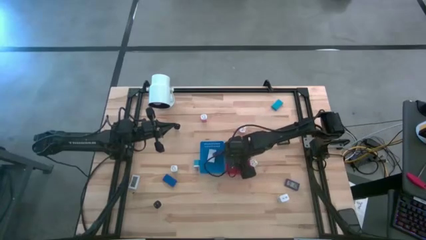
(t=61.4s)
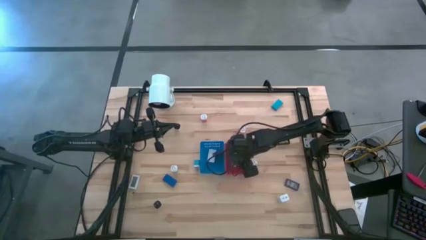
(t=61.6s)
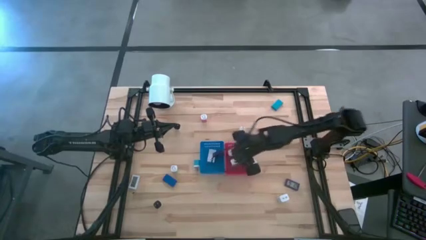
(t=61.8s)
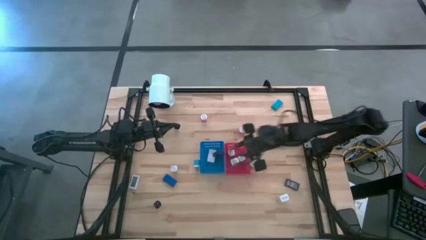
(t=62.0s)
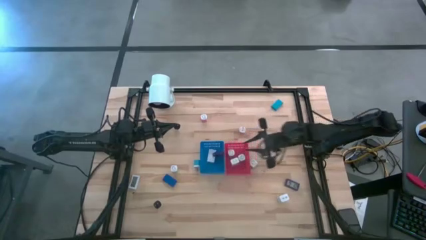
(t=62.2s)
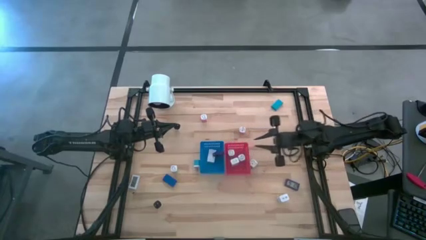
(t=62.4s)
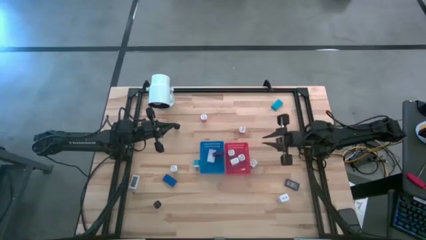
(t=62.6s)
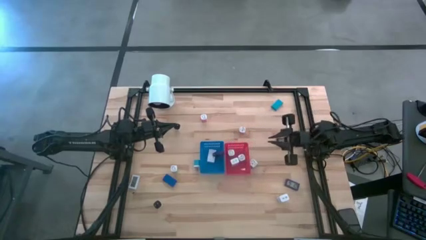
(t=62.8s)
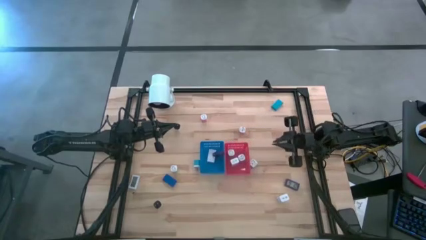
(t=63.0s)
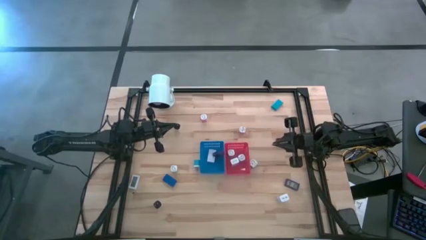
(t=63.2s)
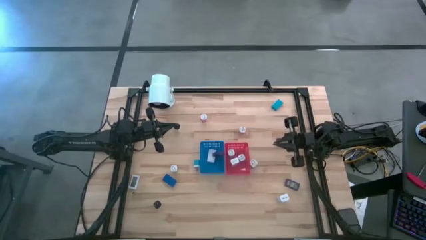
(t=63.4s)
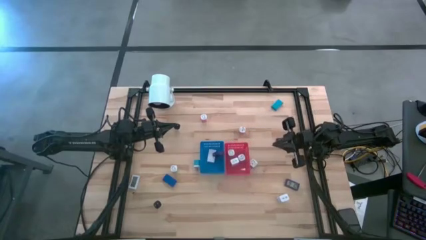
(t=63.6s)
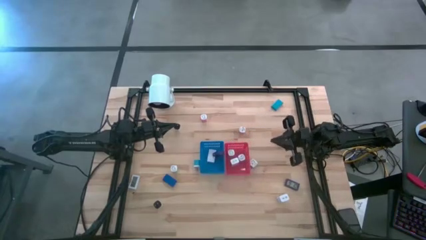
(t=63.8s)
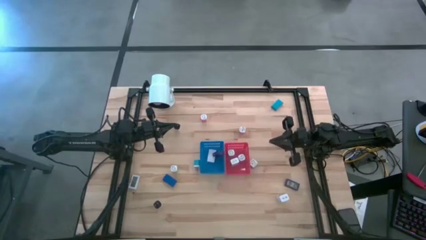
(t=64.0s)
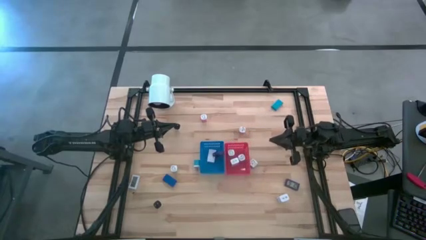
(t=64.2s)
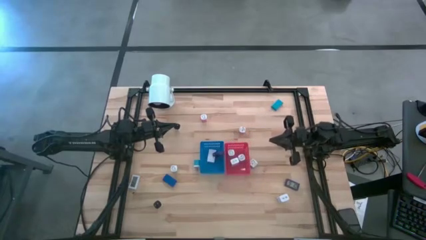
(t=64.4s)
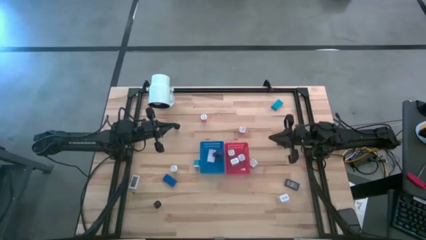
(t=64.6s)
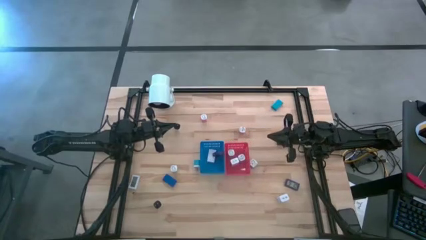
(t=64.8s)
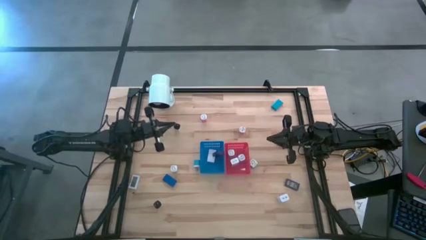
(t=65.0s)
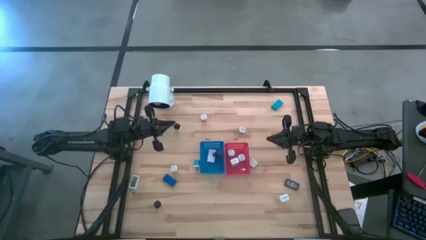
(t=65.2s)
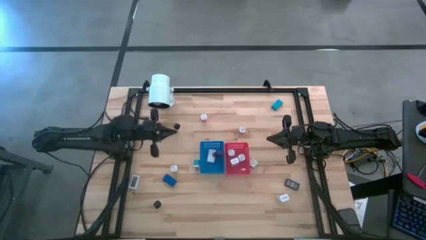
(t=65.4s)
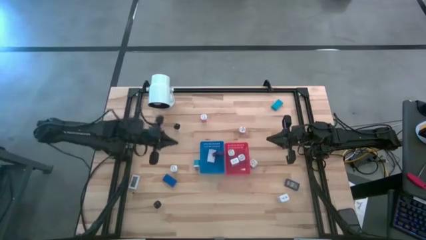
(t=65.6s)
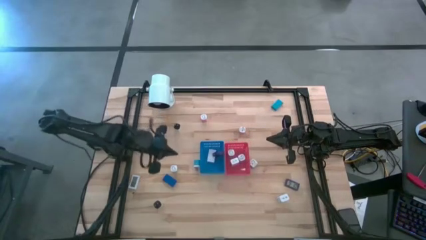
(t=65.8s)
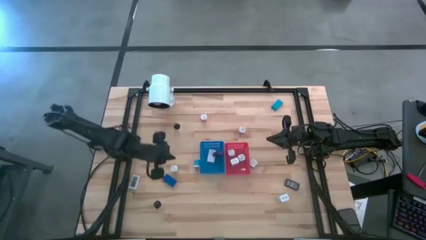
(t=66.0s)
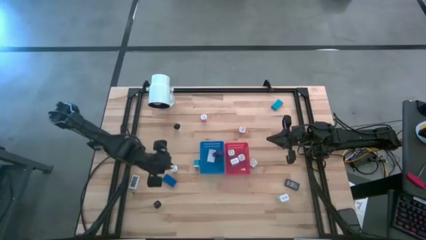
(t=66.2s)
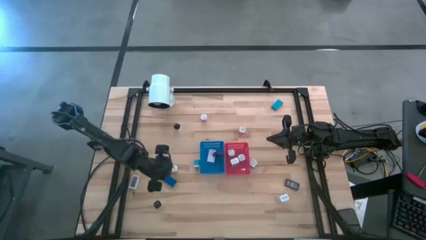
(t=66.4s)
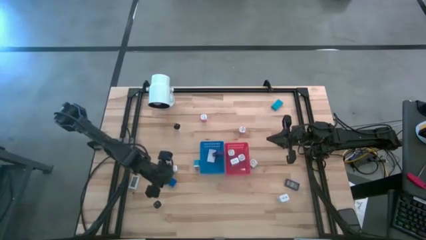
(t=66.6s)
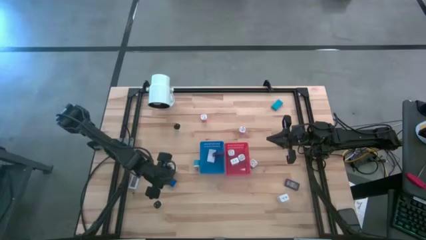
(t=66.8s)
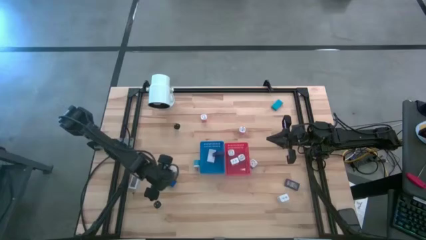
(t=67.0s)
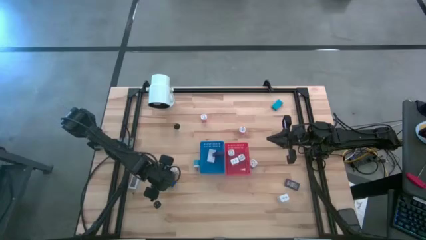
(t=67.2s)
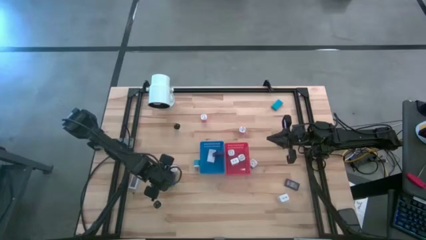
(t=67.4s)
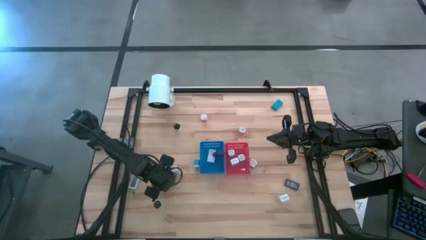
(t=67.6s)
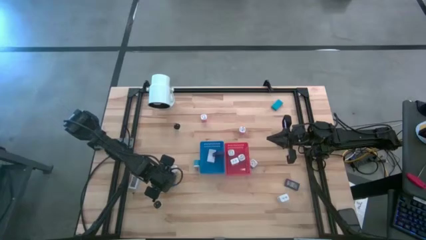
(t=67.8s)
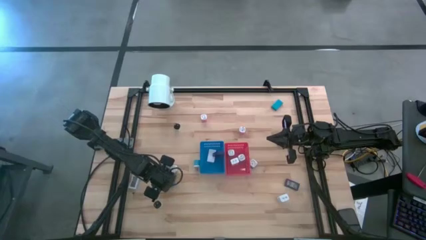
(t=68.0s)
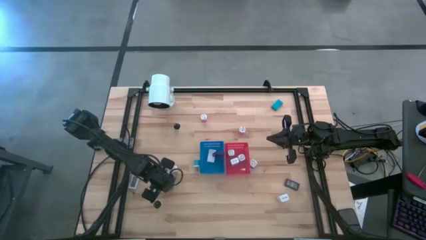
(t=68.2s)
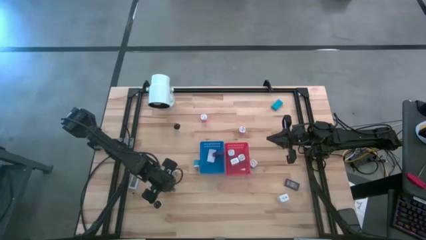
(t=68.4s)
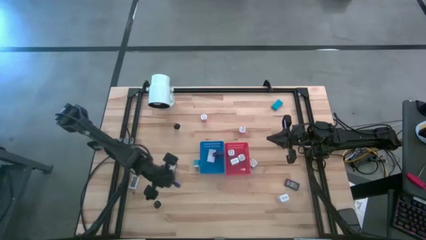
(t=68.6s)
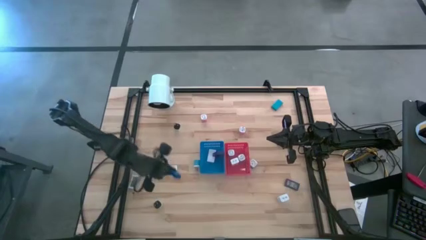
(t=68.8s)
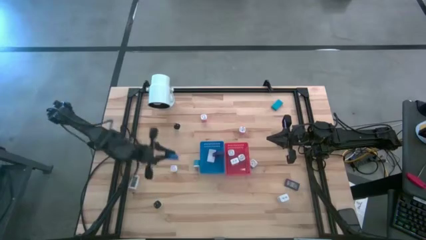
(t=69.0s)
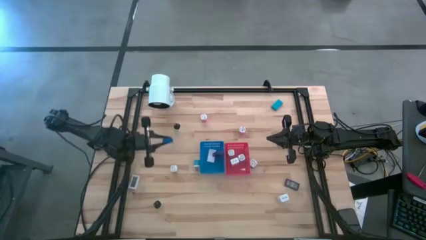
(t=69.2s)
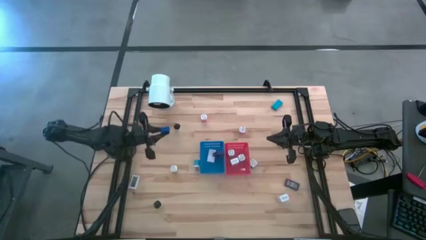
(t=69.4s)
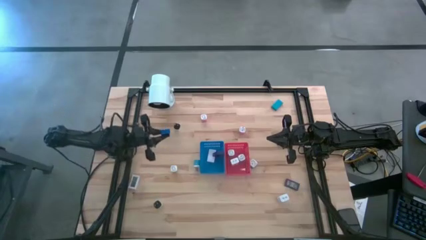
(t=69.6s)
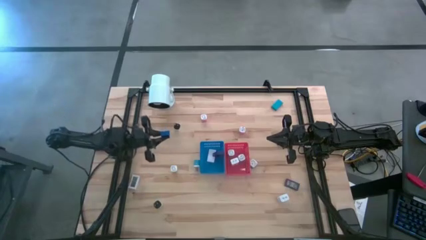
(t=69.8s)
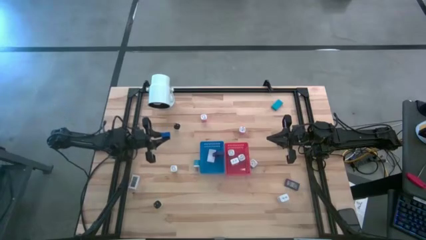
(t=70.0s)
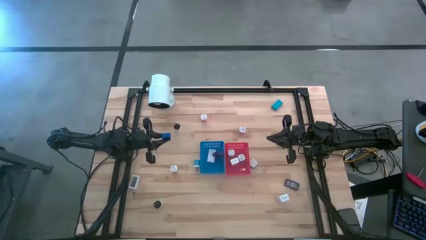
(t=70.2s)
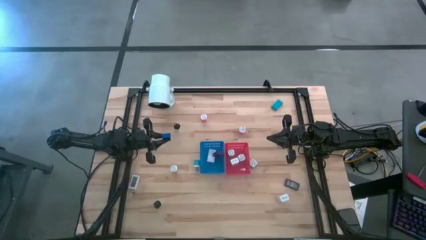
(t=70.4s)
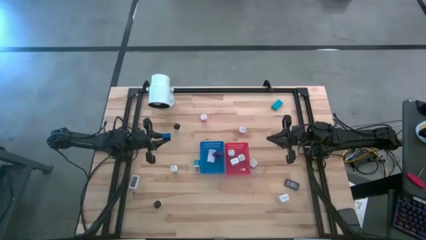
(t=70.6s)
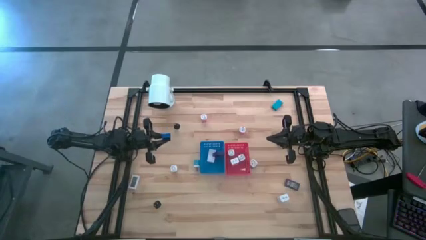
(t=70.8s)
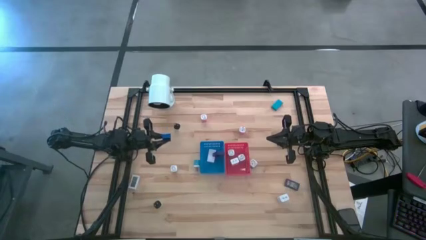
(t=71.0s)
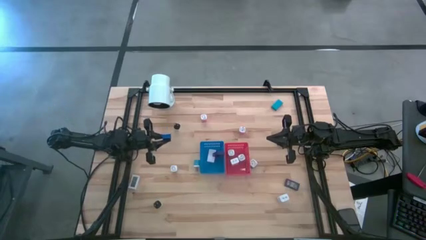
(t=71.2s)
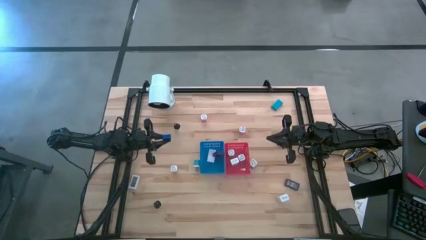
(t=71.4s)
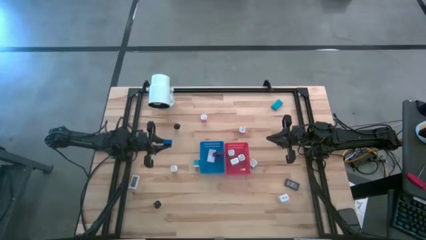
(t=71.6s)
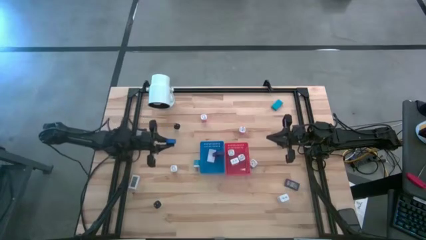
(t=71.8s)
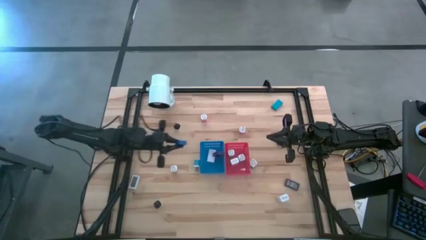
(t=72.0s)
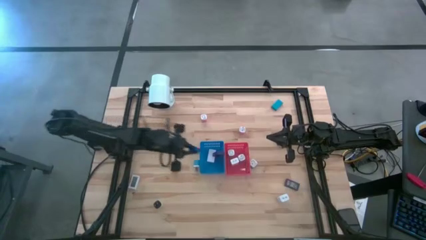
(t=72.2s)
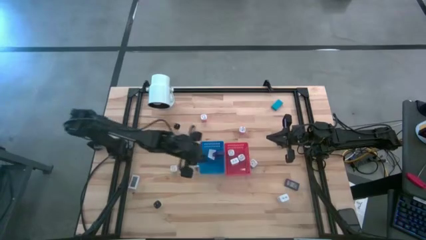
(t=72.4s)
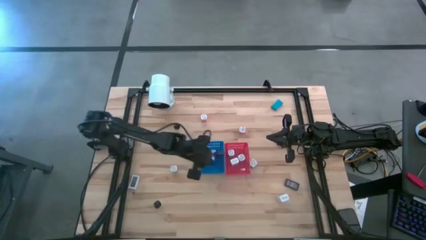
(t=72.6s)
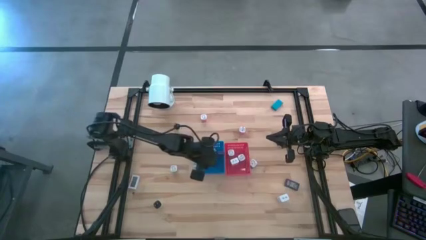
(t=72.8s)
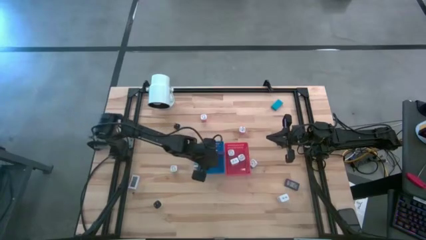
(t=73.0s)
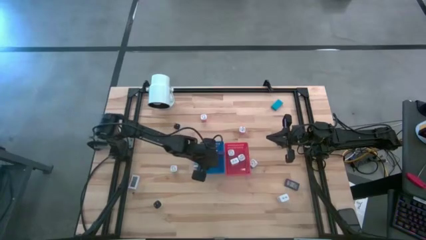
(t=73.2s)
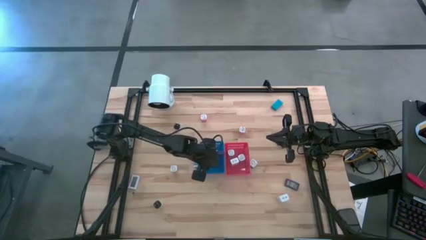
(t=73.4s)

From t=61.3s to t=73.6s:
Task: Sort adapters and digital timers
Put the blue timer into the blue bin

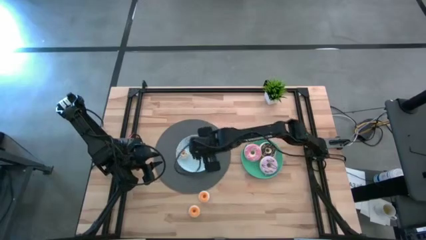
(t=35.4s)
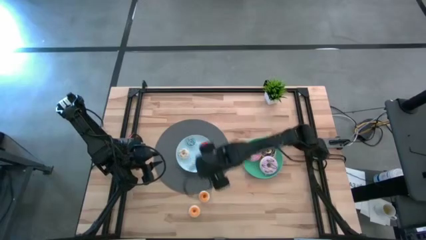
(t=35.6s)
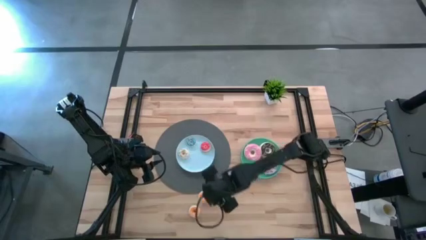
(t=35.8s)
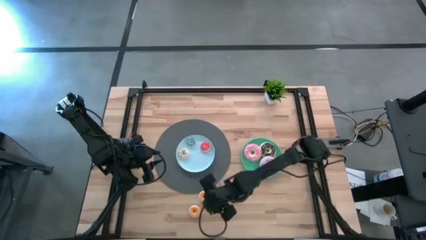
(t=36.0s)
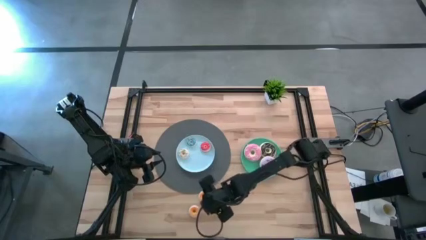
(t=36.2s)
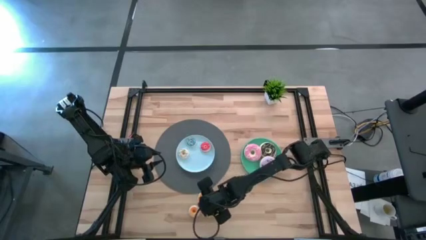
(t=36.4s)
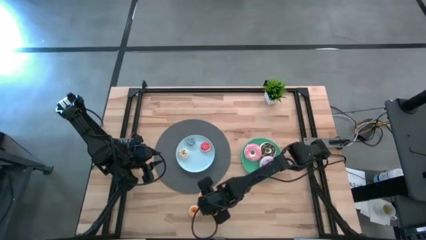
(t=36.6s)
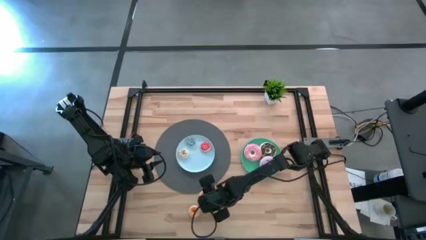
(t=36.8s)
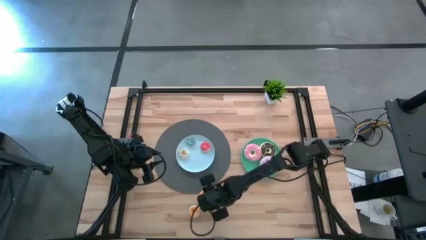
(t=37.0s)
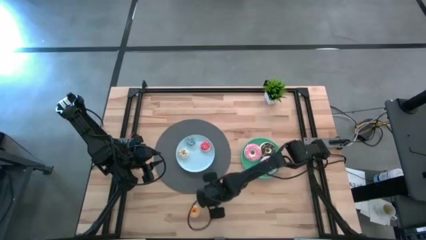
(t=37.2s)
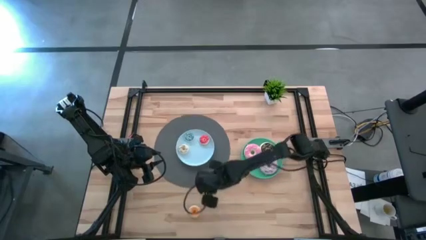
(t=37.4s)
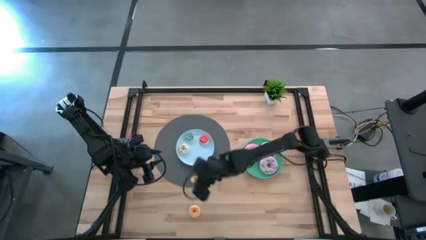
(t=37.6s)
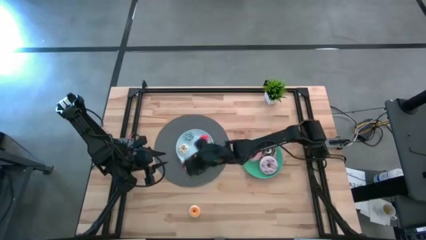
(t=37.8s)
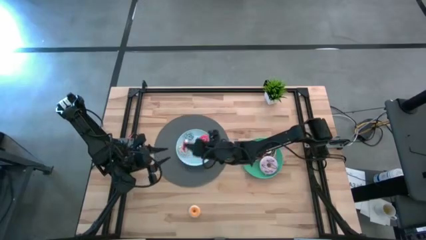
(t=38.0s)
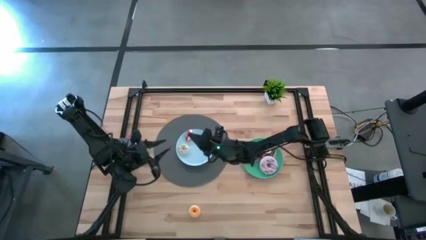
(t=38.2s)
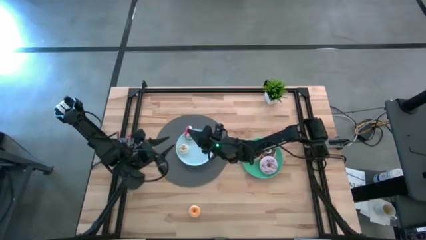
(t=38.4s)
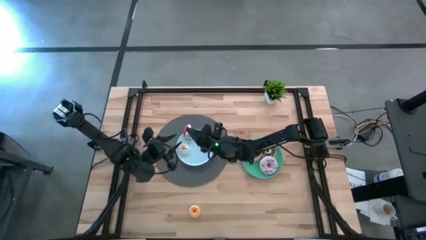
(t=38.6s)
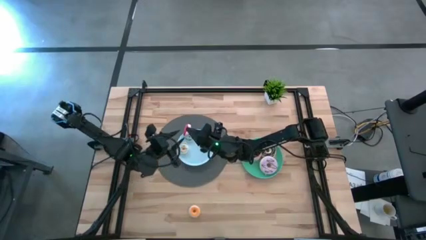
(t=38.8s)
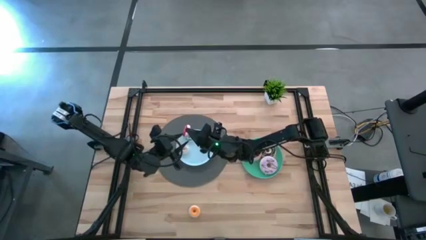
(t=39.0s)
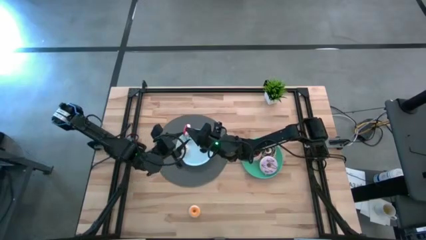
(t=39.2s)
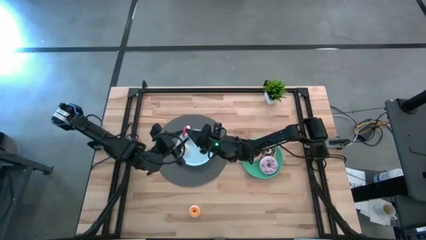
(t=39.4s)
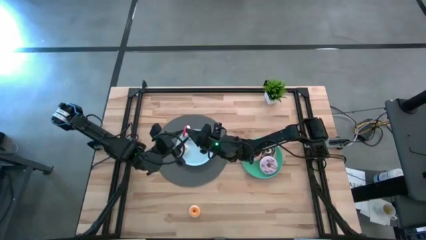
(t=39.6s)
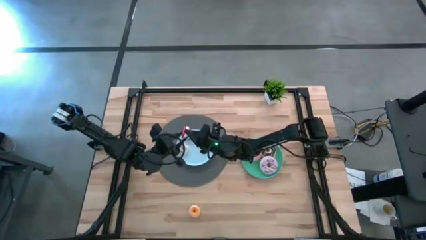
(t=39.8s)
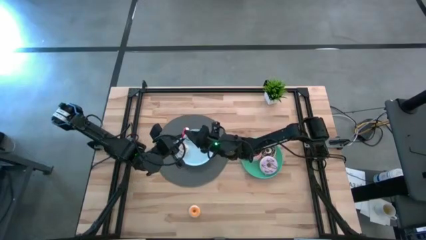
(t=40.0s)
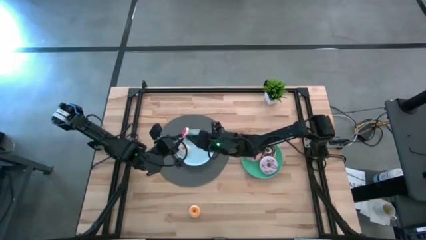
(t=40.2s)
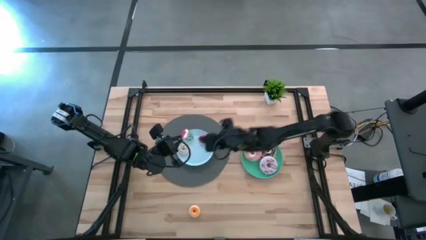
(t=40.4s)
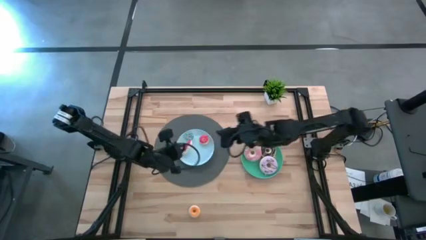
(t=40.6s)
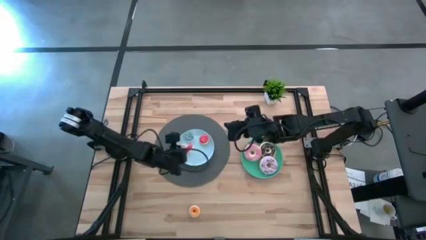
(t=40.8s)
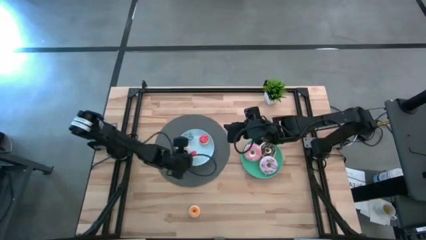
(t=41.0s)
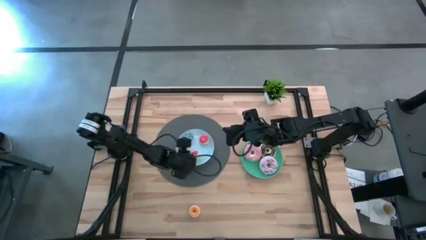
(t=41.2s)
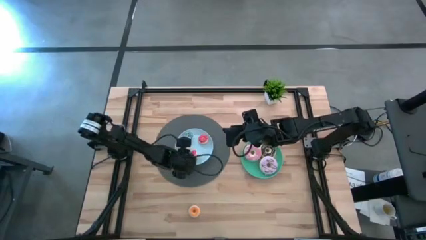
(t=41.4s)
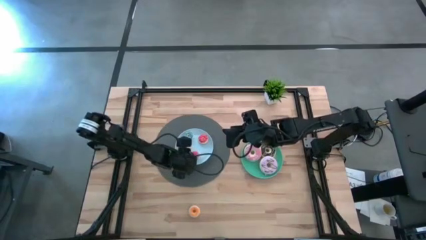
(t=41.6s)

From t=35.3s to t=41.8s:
Task: Pick & Place donuts
Put the small red donut on the blue plate
